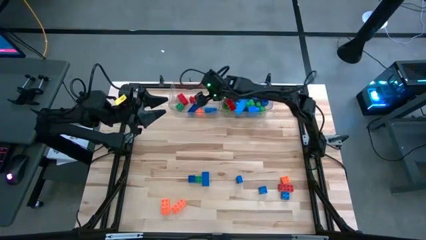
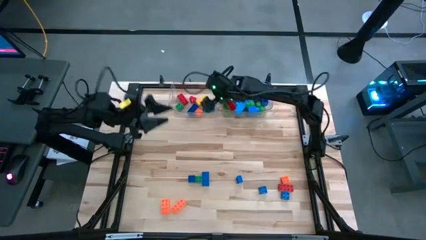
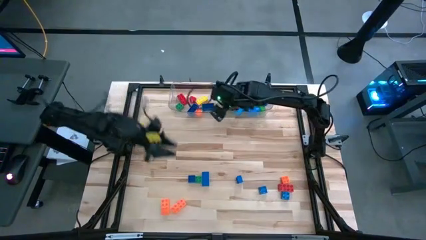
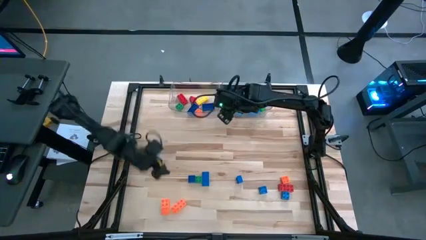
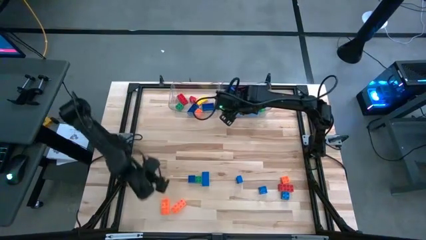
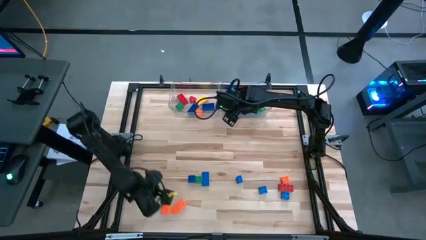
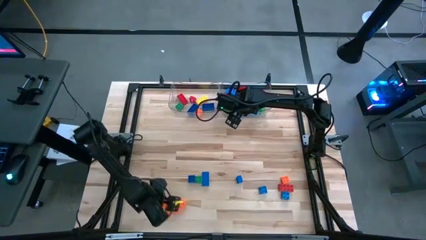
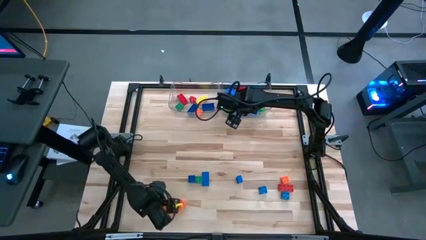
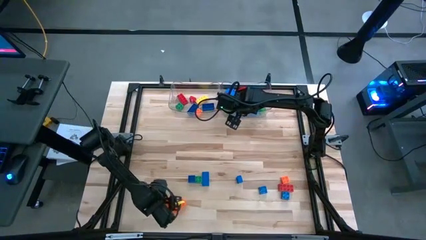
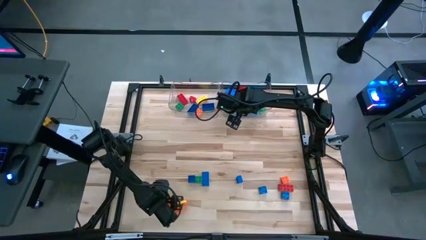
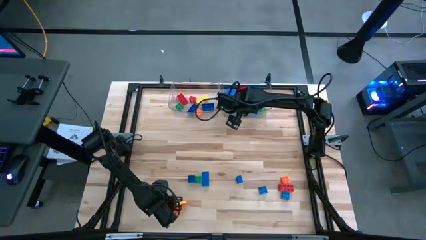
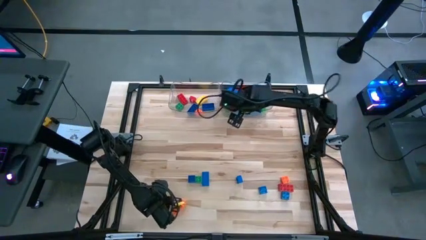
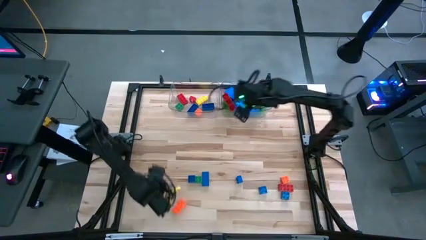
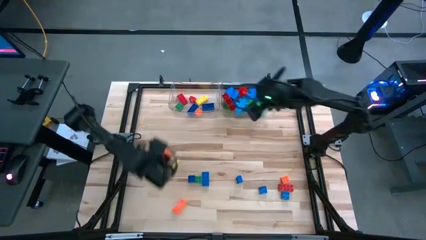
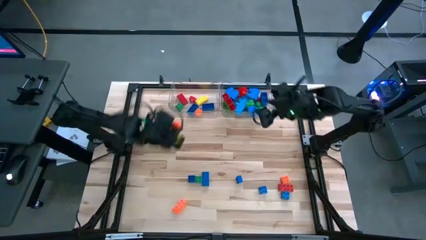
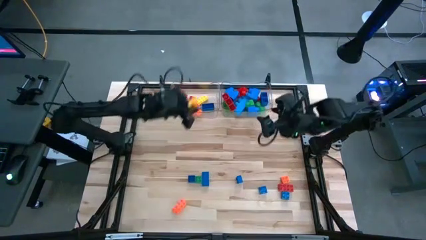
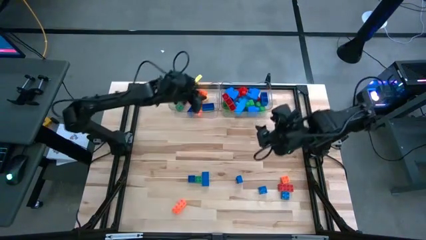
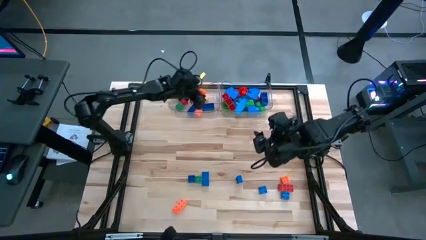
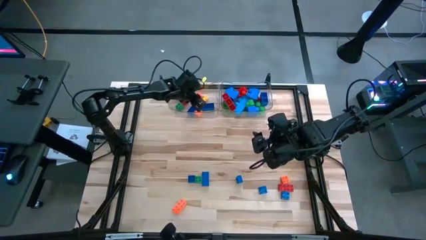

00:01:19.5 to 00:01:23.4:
Task: Sort blocks by size
Put the orange lego piece into the left transparent bin

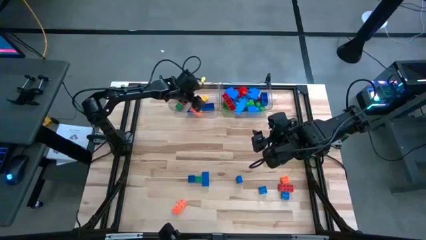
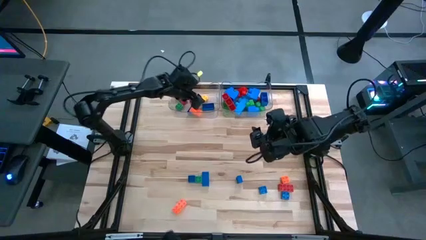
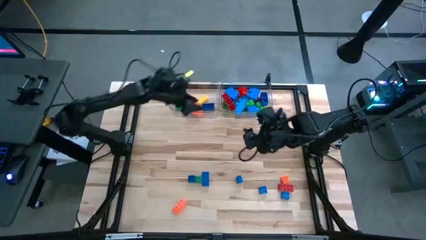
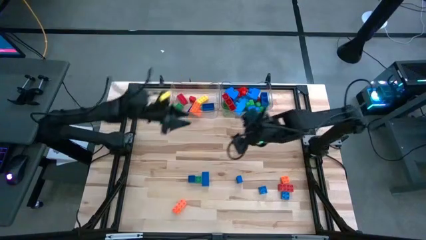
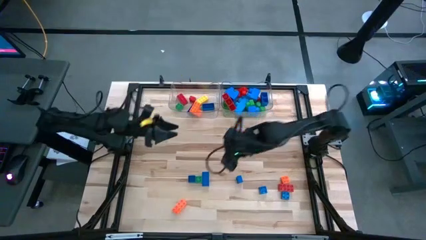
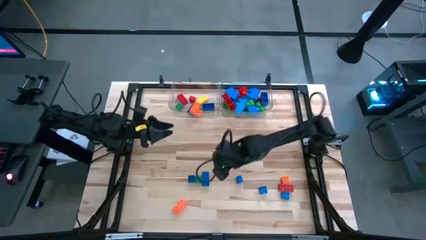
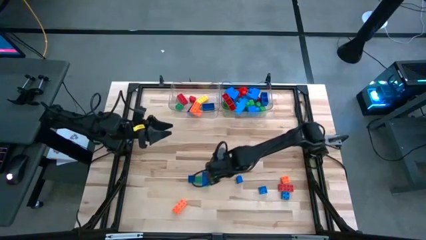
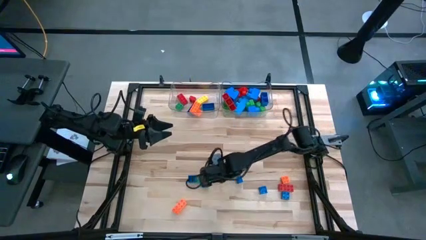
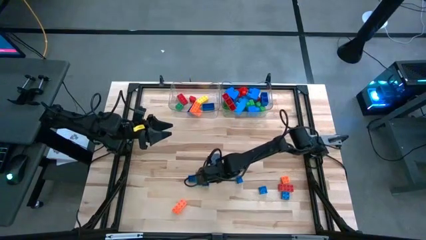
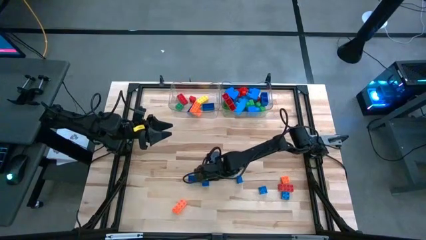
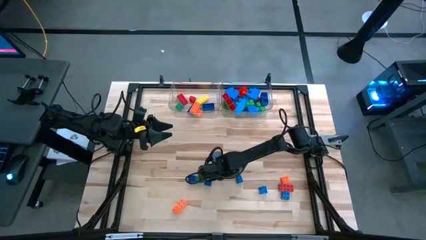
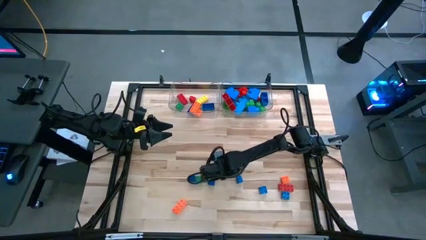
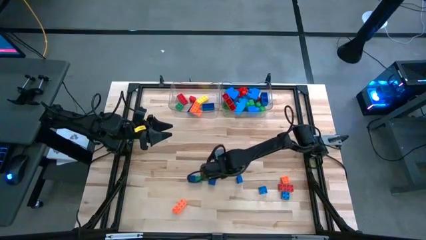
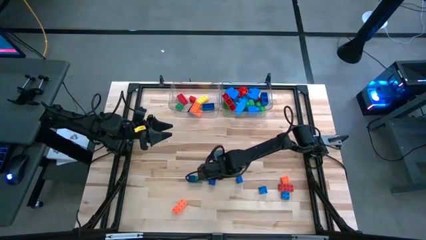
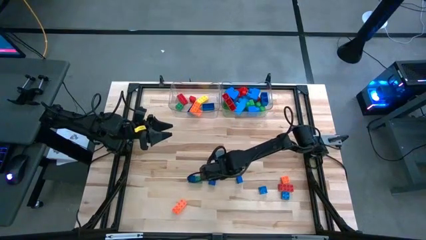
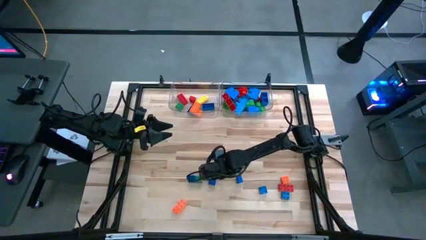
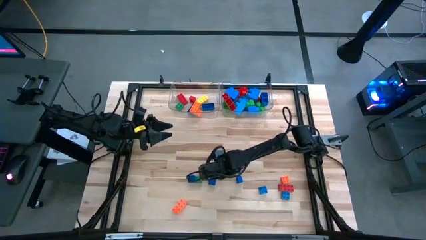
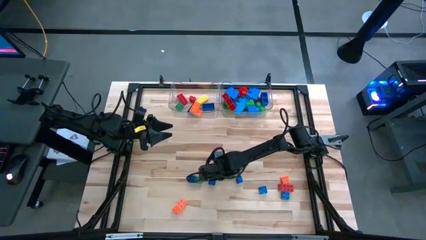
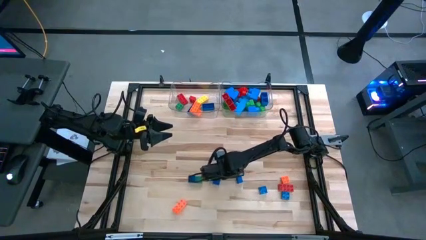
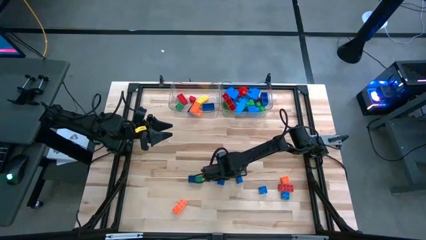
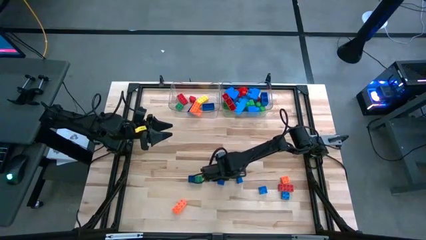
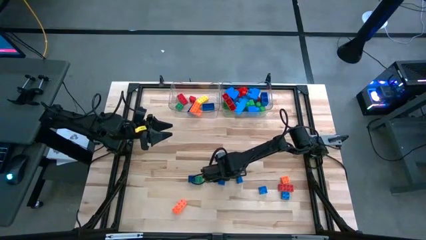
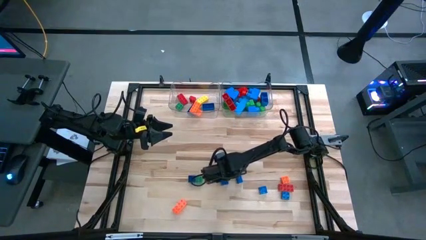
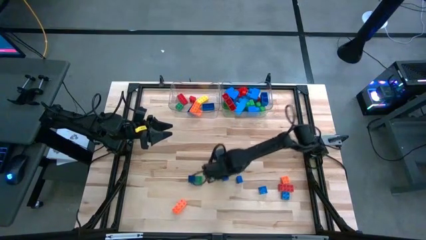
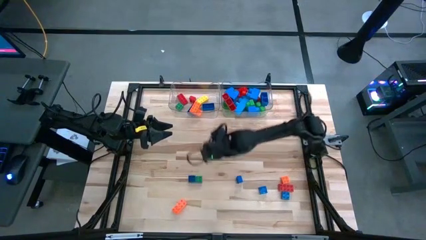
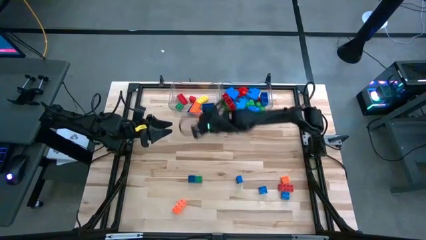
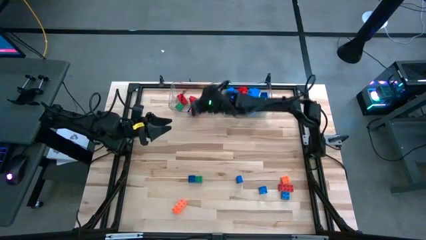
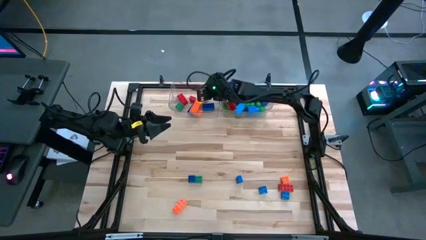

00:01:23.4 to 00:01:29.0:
Put the blue lego piece into the left transparent bin

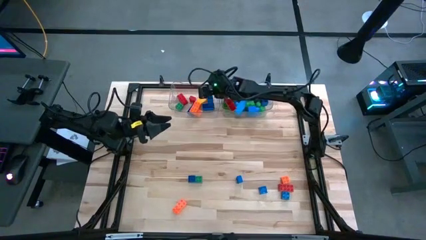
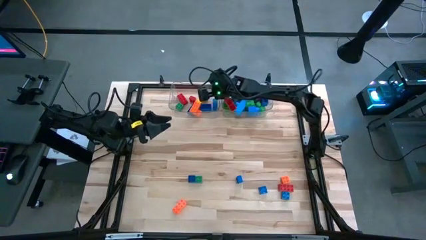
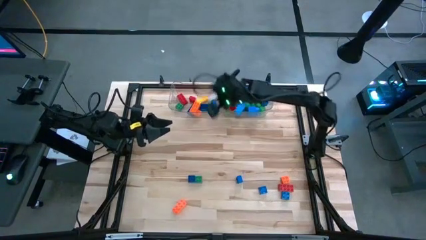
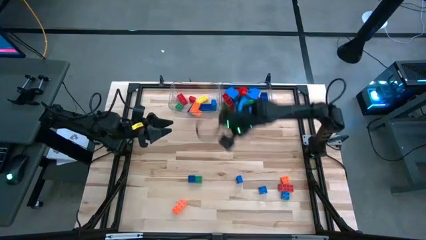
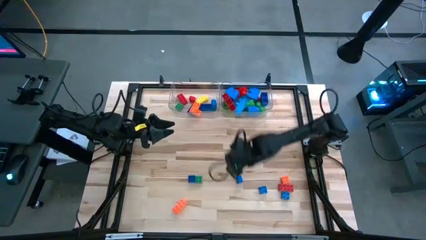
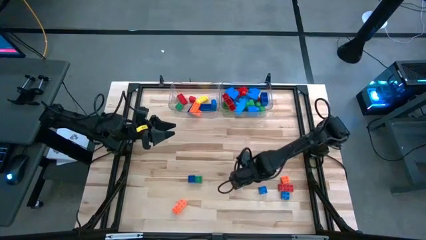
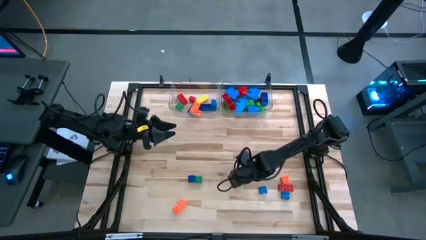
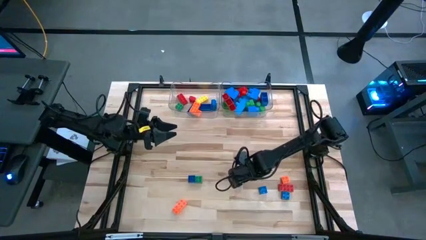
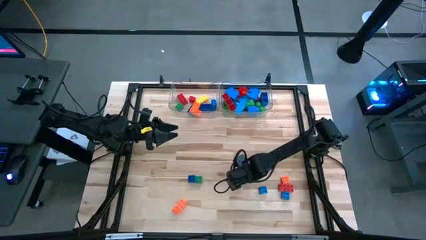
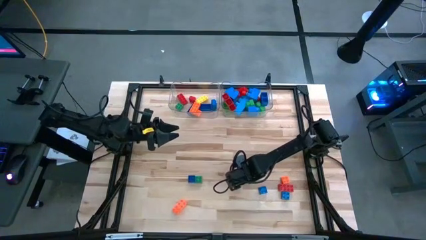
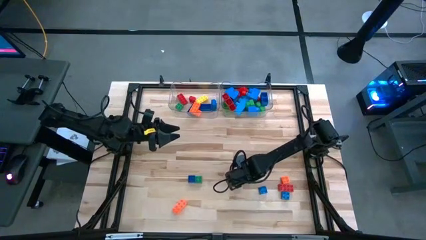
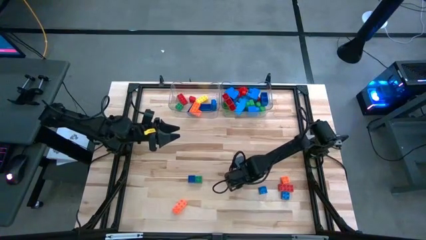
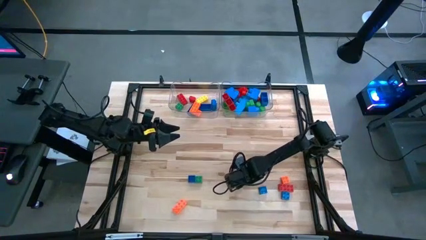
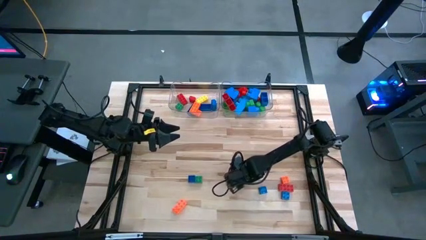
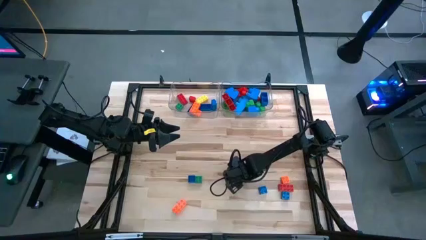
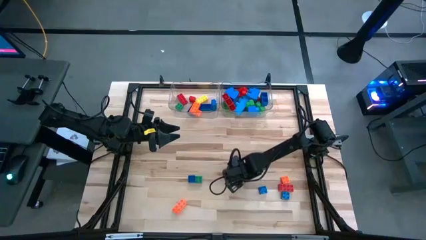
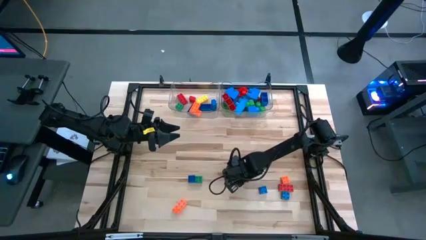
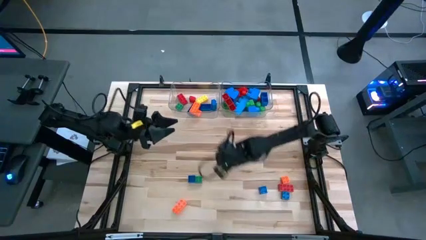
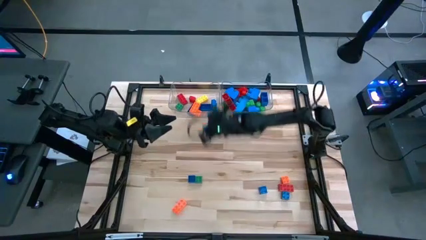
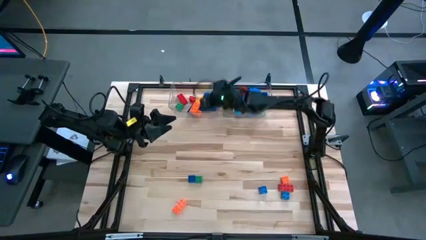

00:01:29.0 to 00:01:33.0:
Put the blue lego piece into the left transparent bin

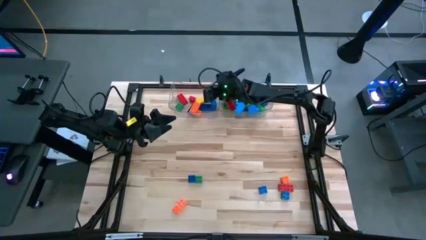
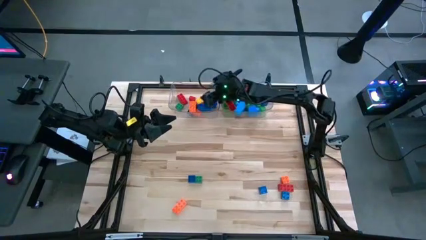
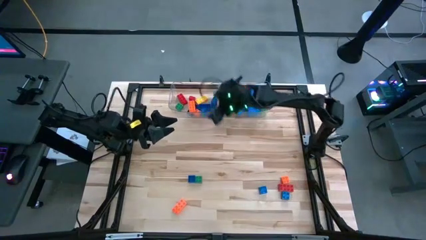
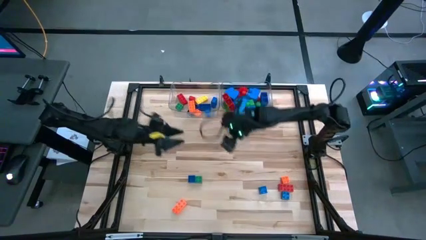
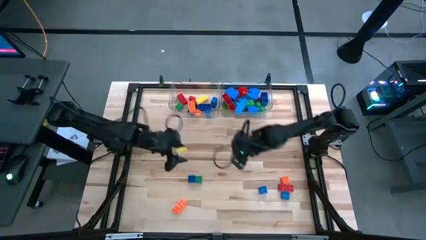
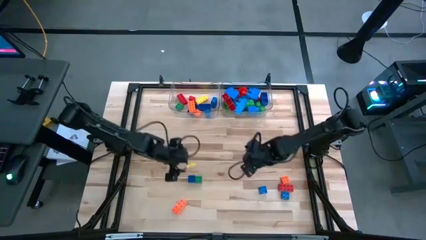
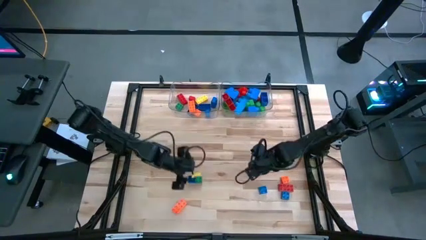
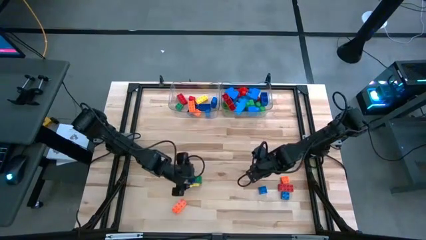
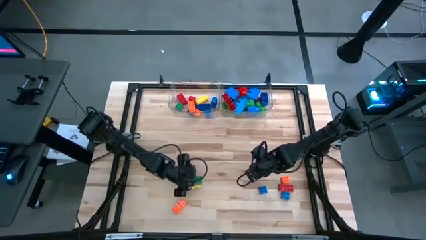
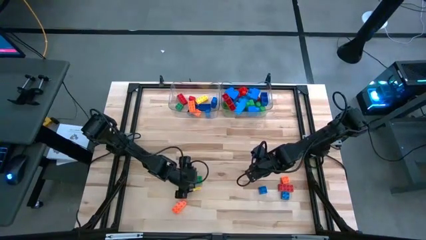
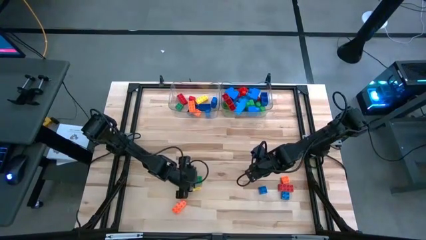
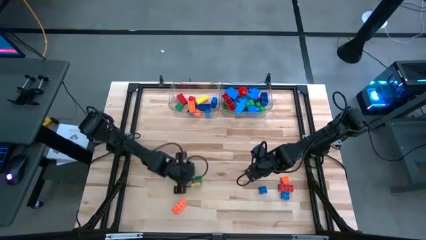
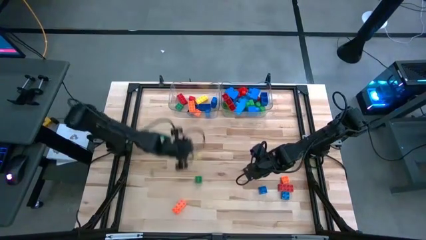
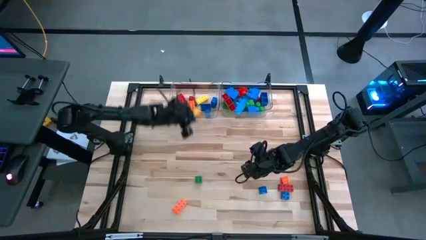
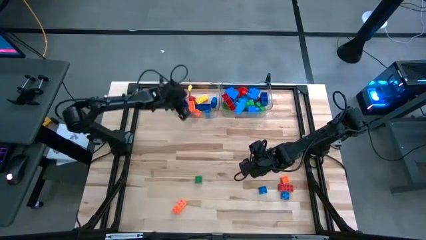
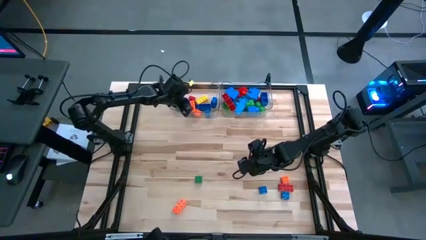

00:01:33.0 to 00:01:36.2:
Put the blue lego piece into the left transparent bin
